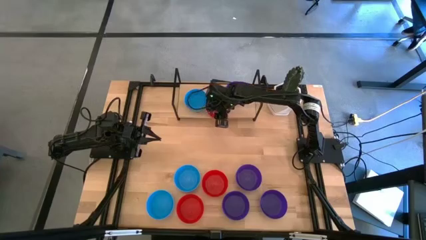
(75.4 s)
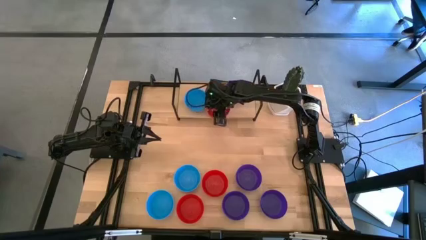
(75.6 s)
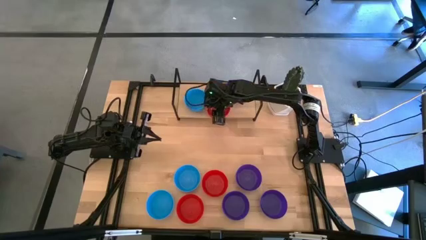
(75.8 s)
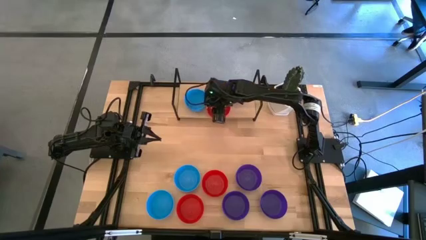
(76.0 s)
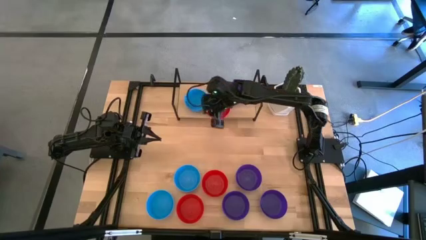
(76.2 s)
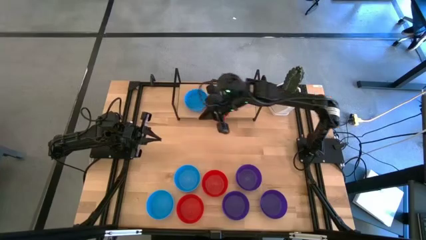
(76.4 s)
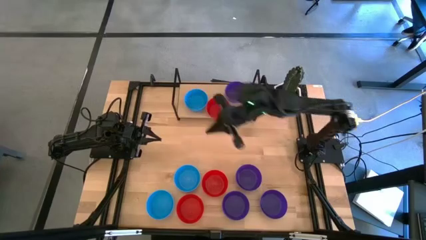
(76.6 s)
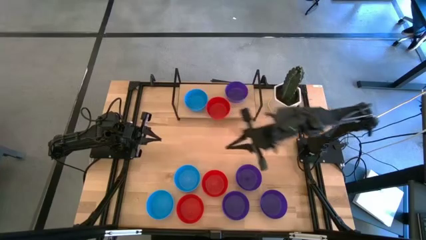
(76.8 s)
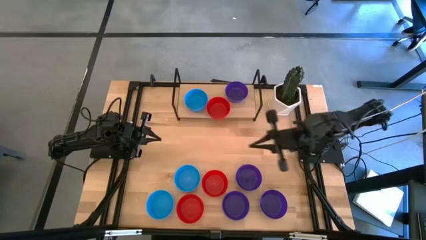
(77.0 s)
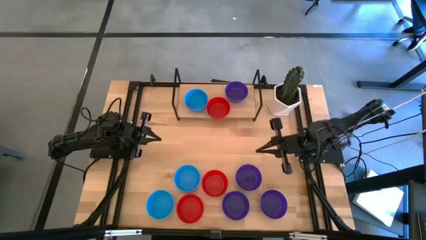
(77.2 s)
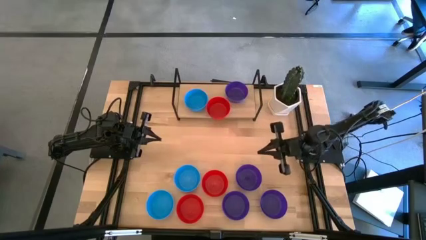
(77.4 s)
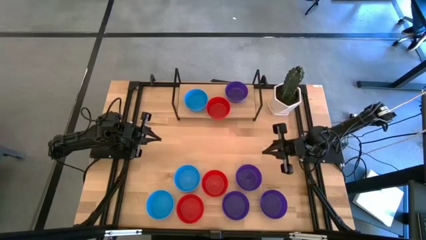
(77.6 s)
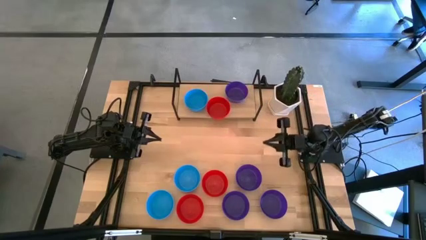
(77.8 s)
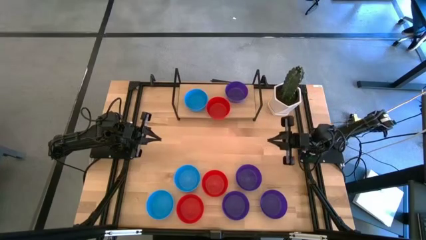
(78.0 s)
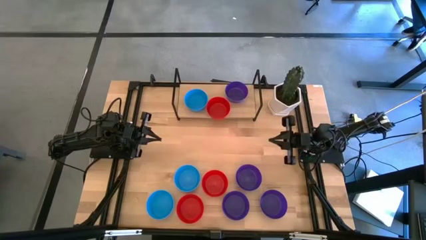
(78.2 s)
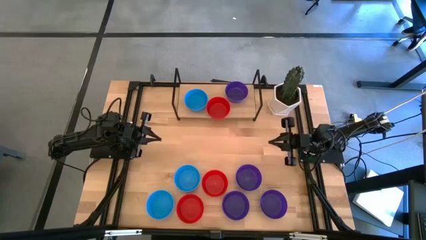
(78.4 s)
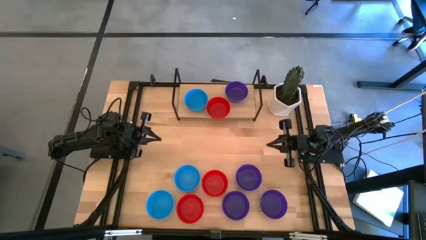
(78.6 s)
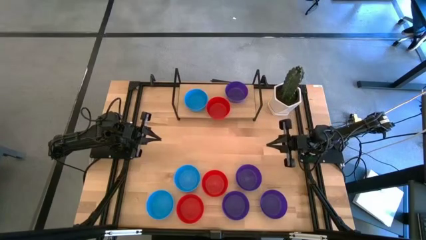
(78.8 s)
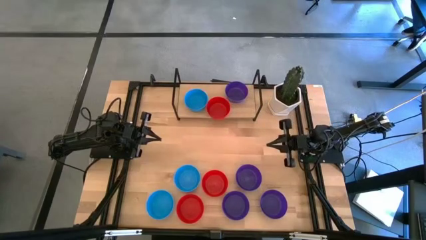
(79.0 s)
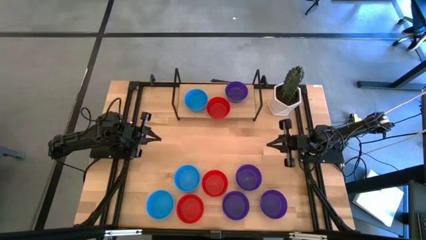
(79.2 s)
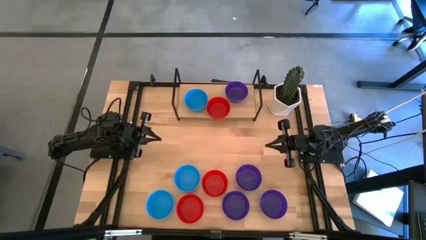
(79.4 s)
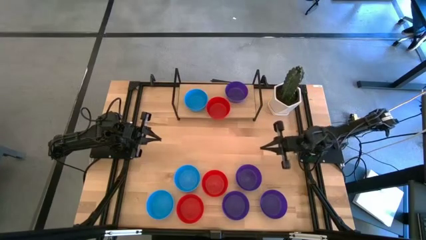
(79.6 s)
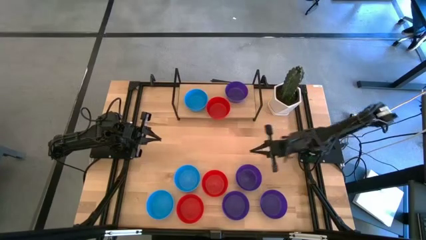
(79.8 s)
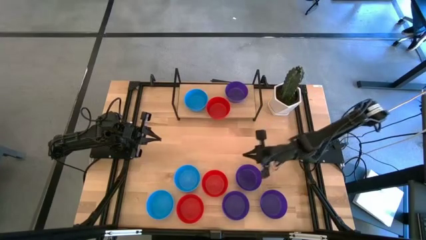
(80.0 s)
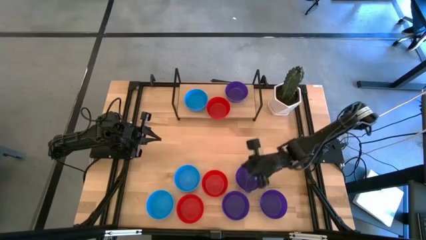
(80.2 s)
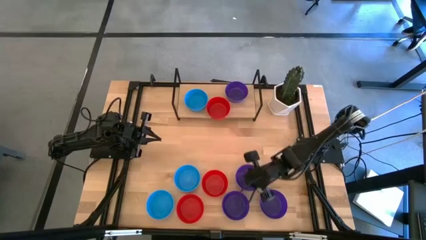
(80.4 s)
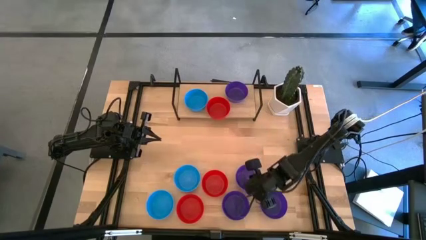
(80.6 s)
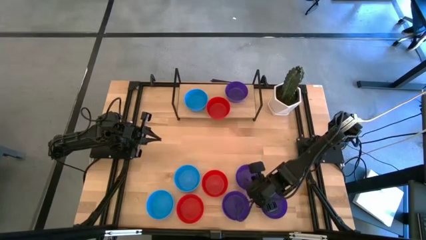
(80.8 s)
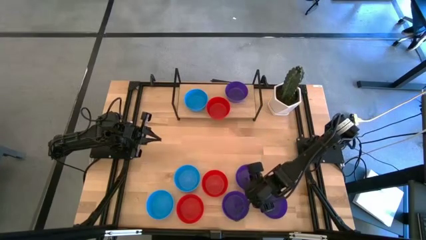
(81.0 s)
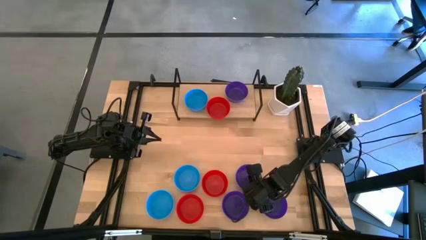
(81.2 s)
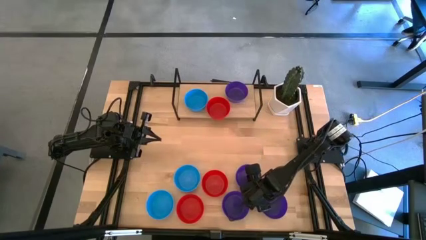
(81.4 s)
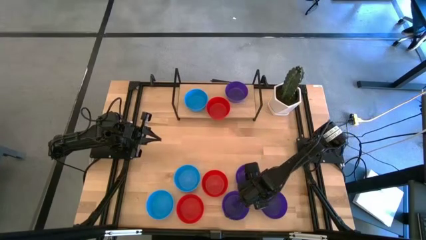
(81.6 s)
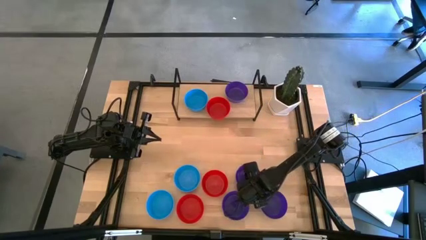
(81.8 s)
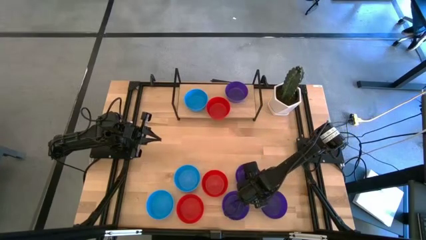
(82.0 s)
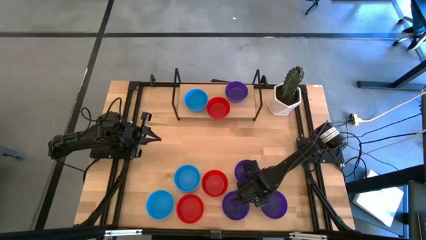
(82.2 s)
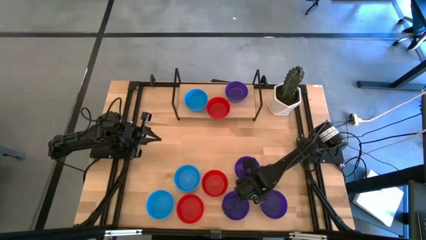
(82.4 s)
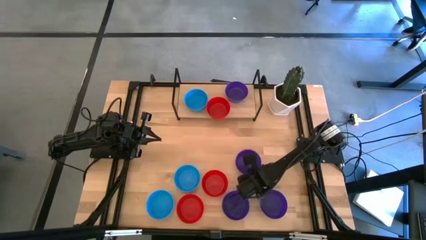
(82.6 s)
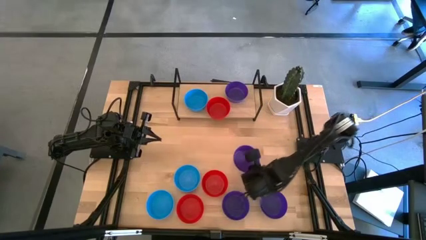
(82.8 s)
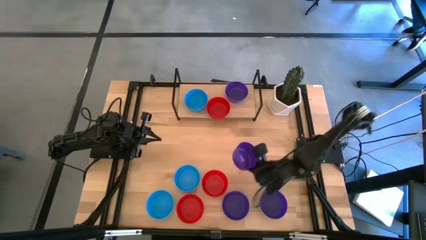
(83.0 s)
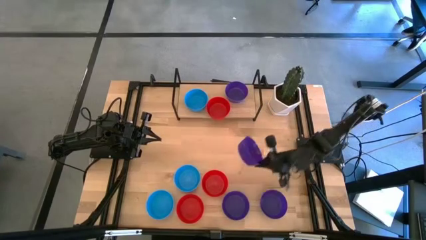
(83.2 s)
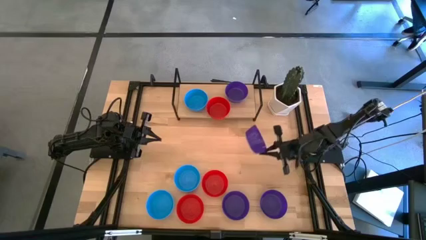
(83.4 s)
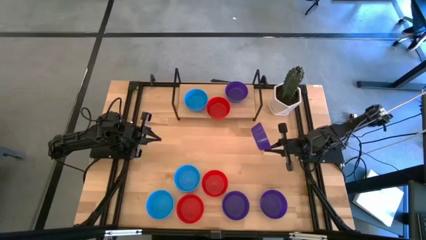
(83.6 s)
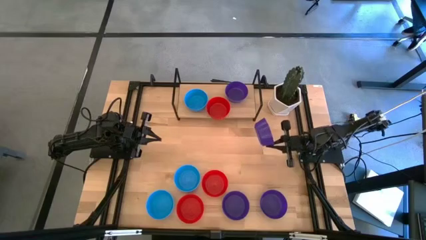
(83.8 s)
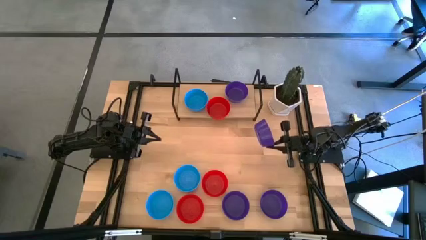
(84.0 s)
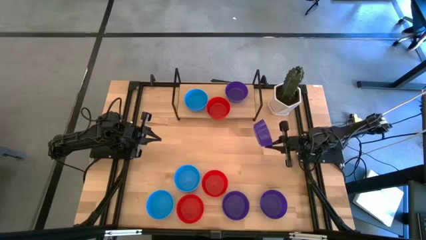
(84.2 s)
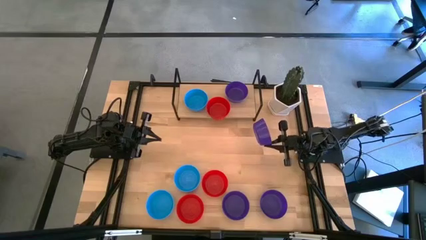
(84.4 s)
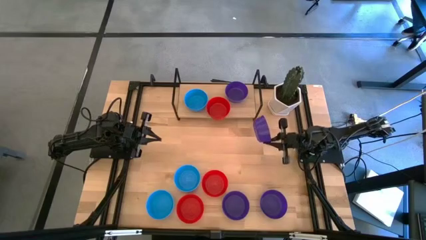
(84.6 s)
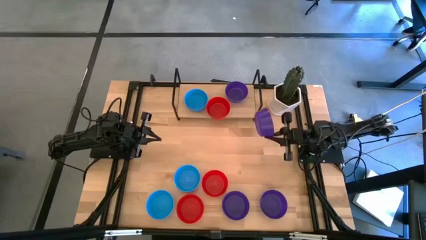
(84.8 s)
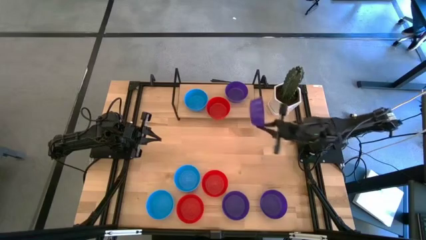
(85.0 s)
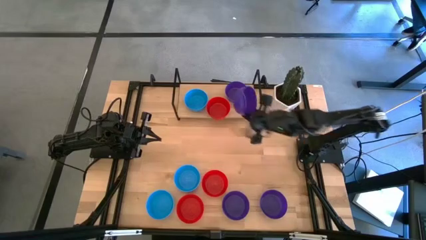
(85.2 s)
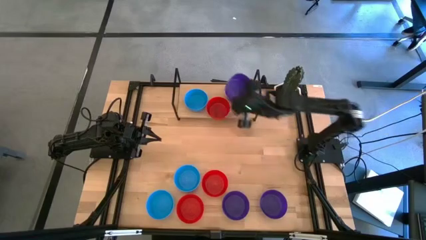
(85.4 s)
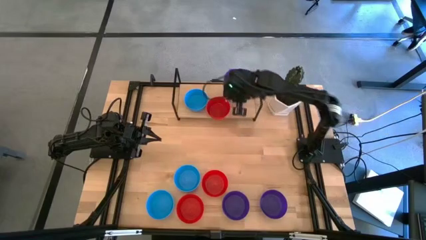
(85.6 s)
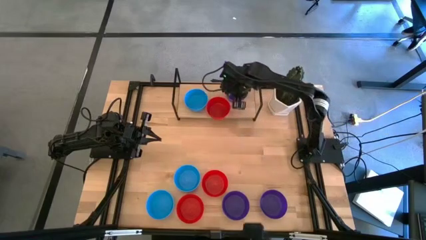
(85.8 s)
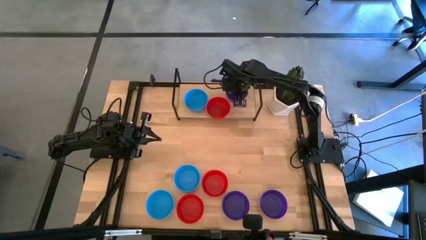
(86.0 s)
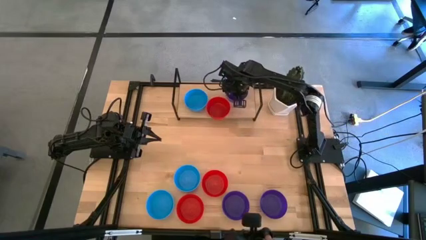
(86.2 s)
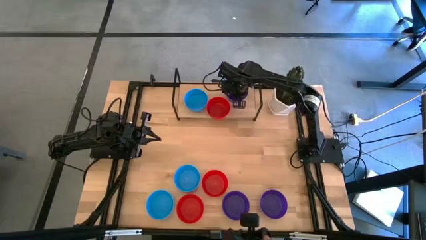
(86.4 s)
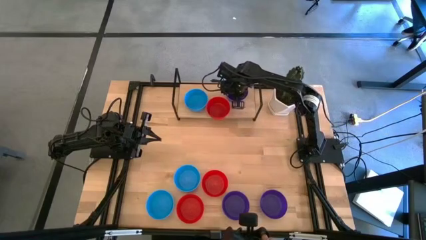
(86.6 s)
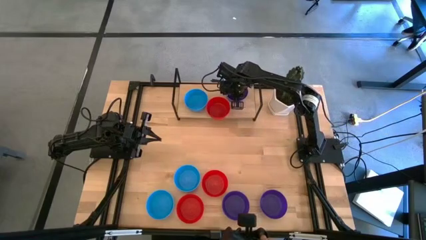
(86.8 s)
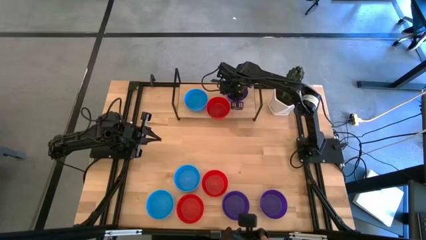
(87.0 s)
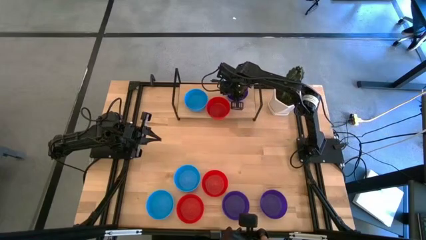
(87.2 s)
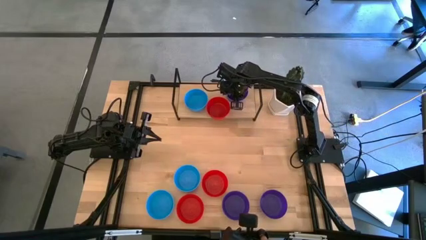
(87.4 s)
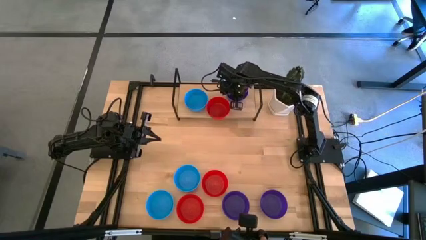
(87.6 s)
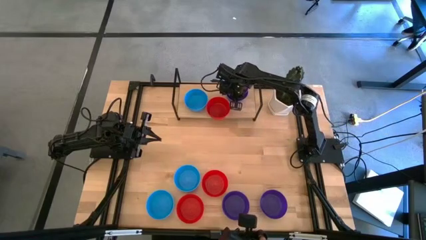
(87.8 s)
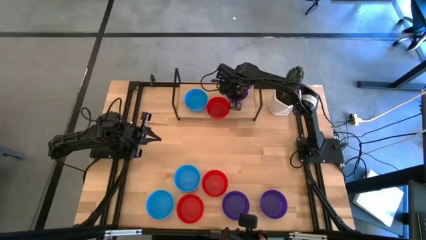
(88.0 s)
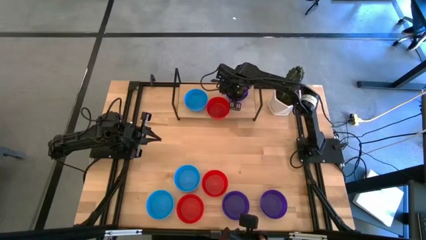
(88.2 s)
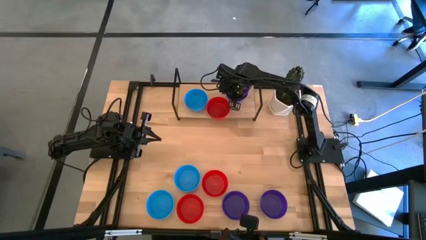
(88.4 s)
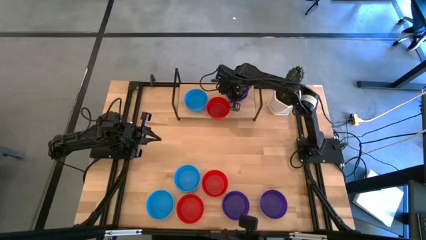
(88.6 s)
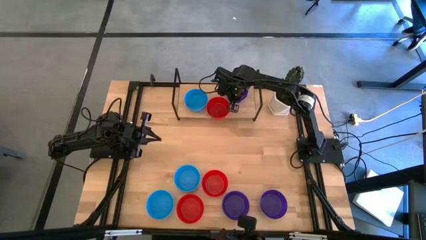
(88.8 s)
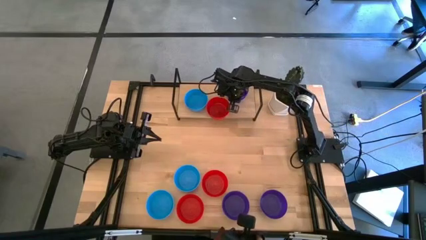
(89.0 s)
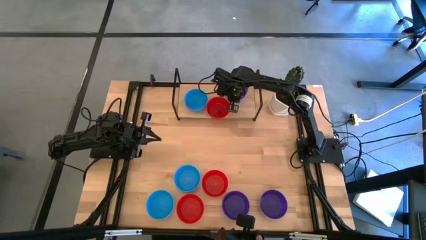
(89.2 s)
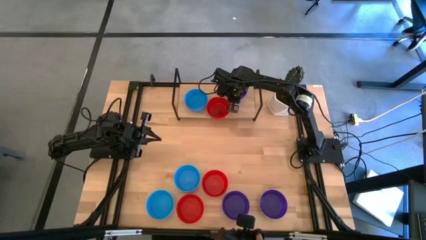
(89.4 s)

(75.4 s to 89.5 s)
Task: Pick & Place Mini bowls
Stack the purple bowl on the purple bowl on the shelf
